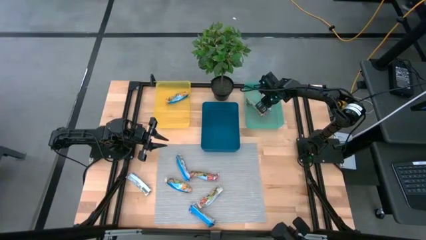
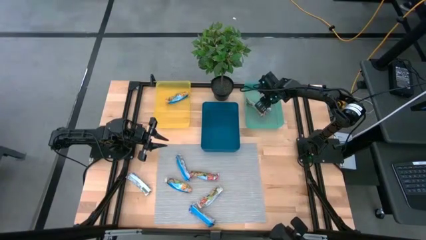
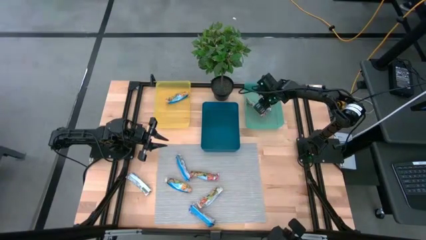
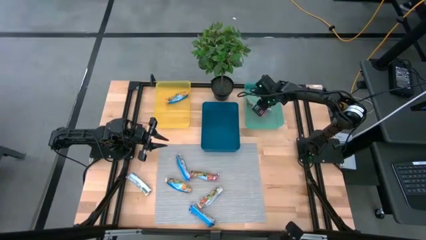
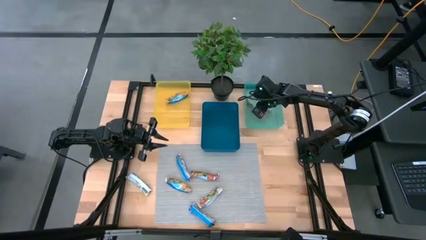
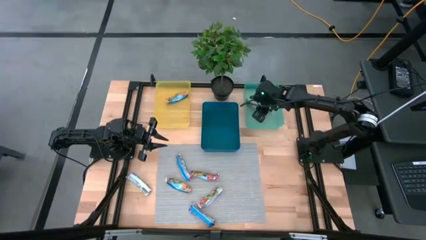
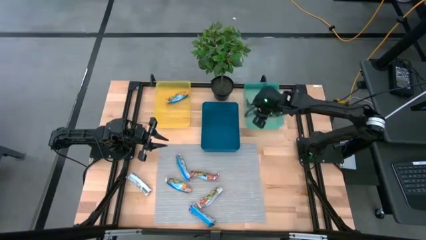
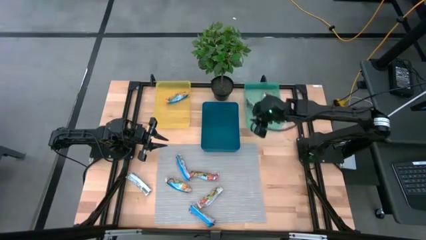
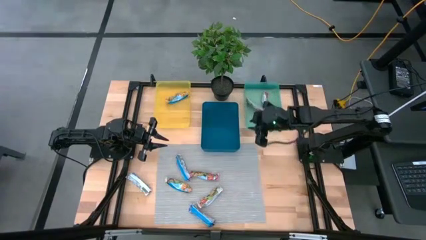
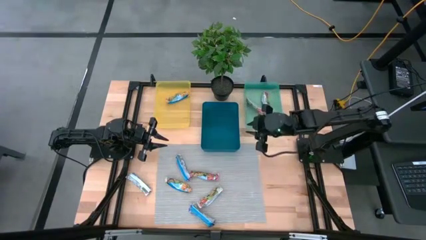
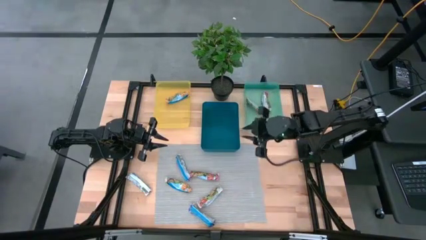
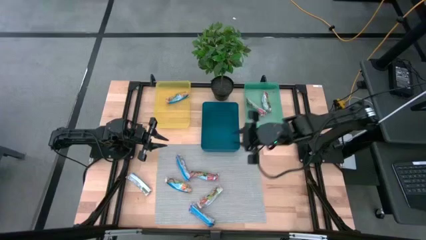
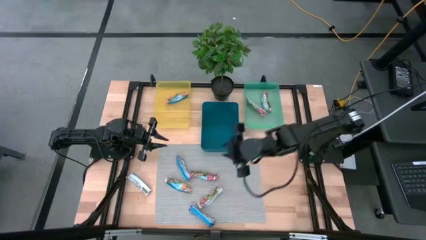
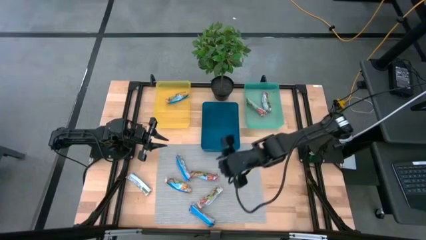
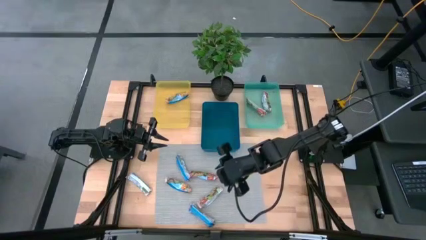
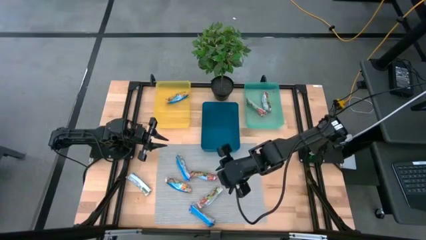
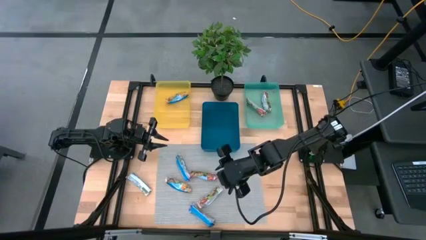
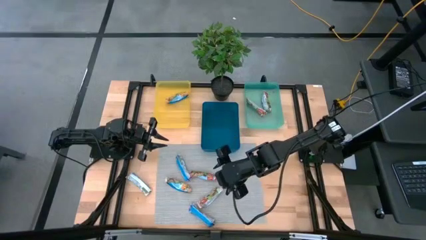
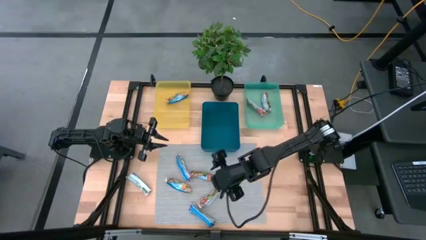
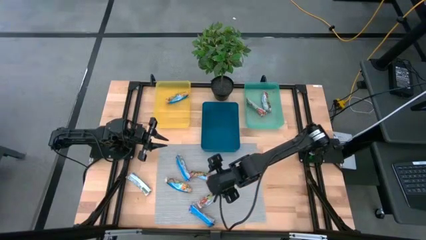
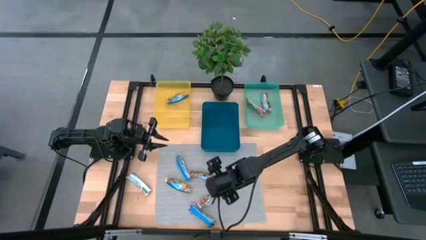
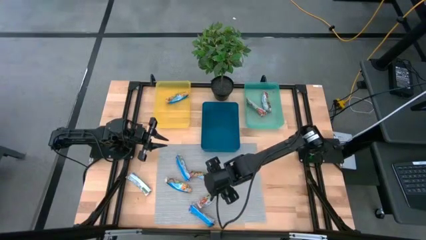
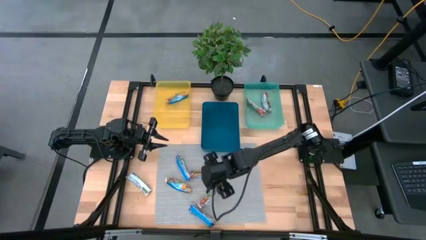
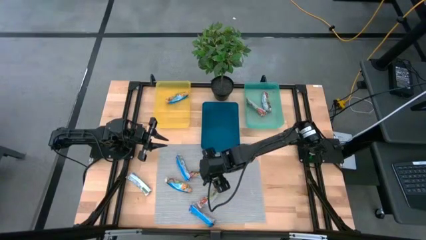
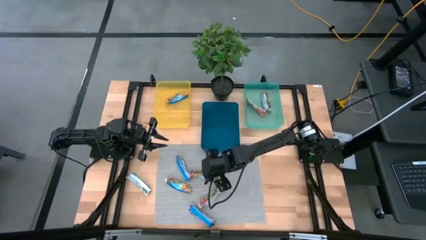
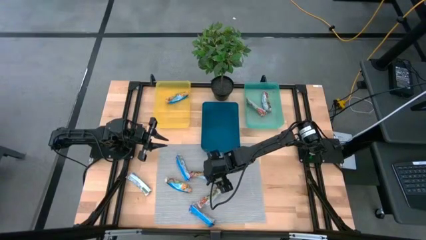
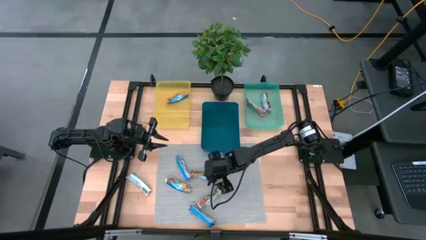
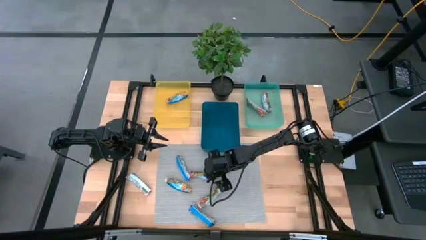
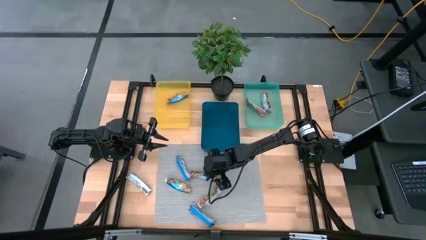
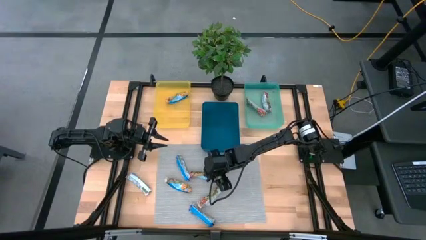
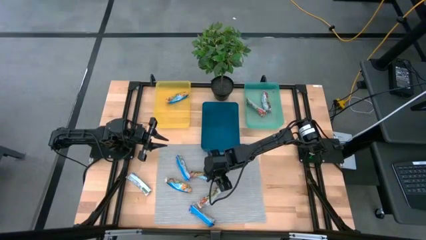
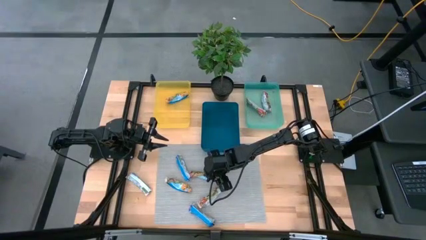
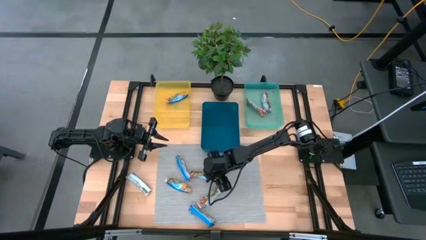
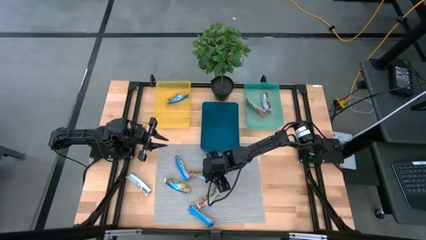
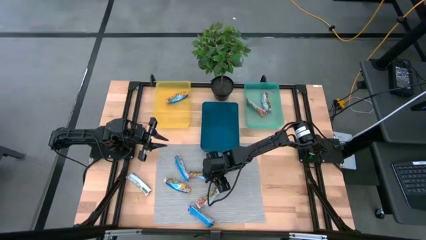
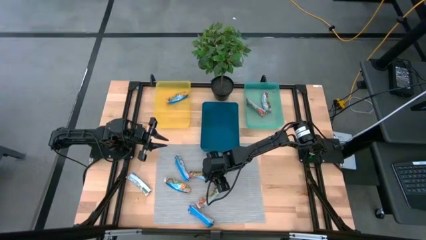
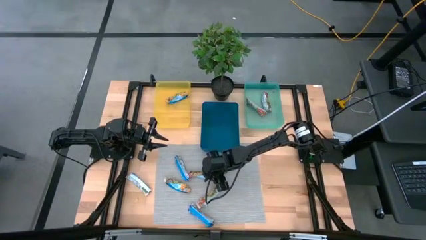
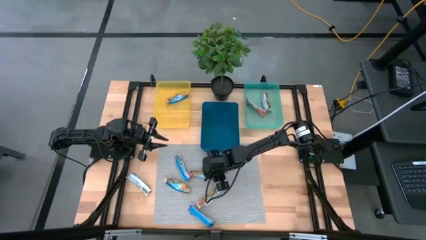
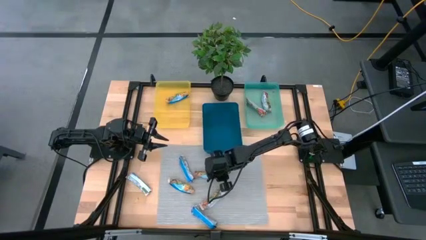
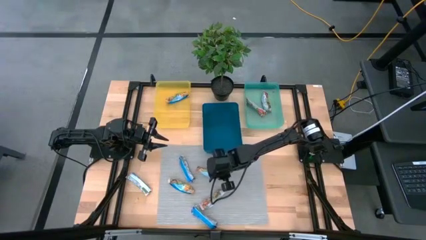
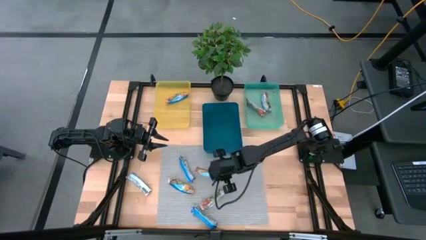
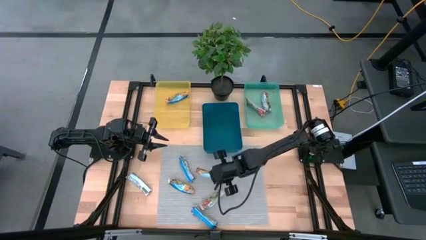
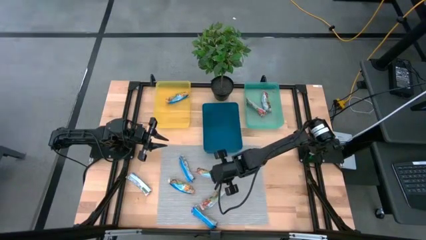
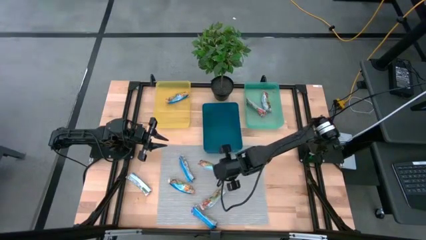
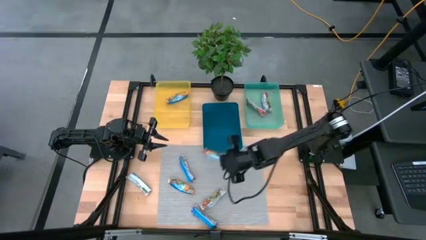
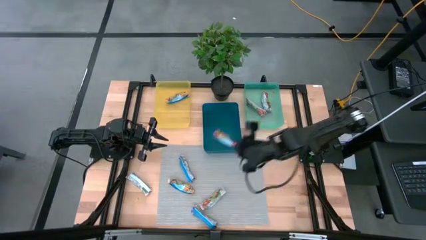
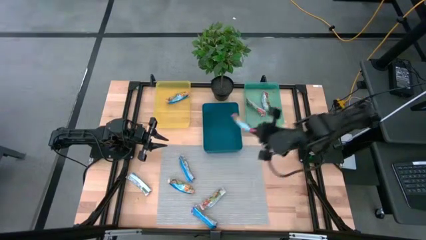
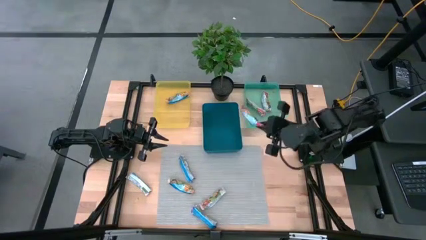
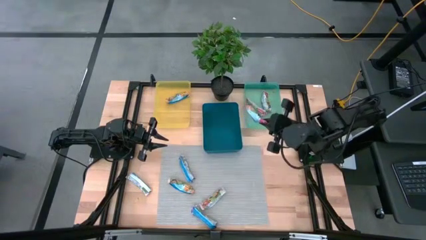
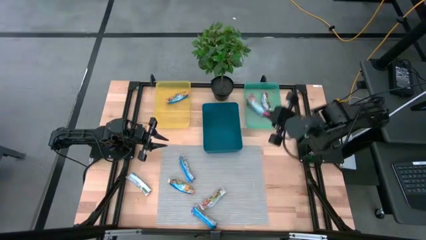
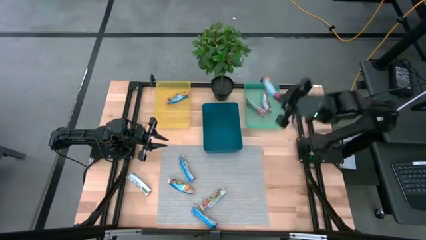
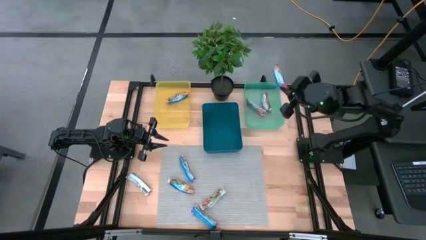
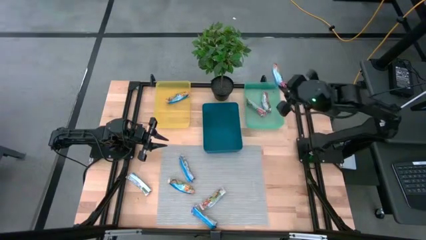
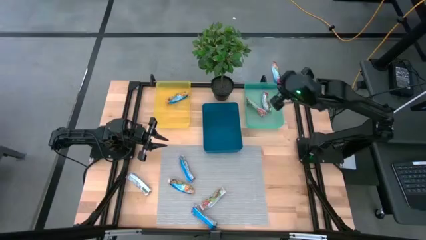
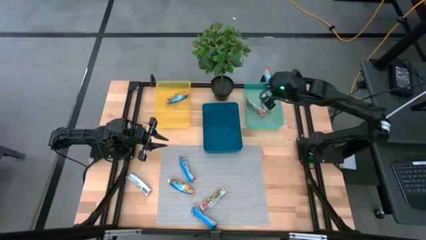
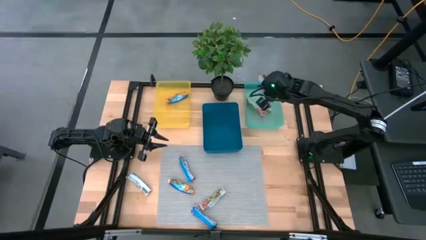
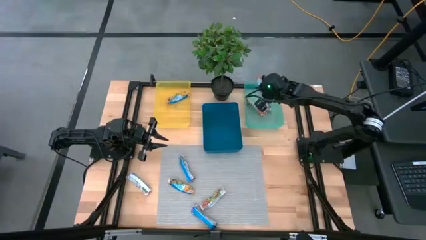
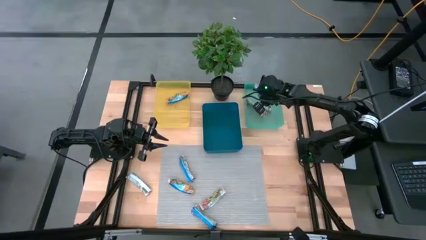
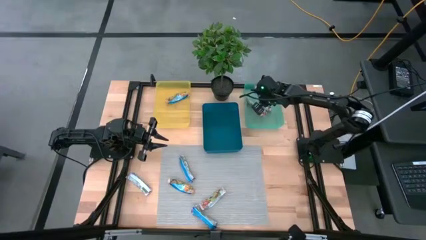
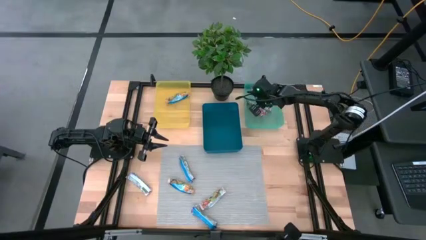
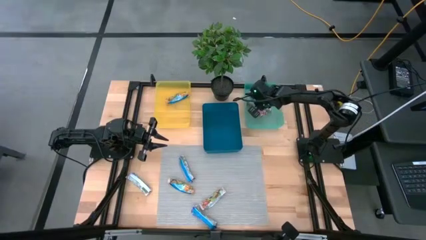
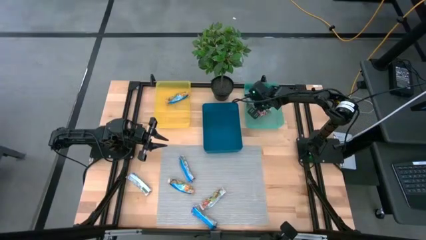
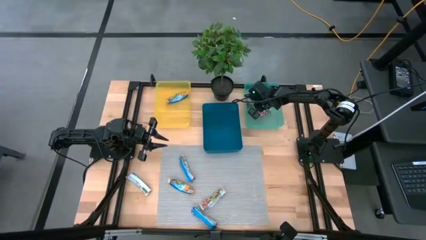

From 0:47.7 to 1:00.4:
Task: Pick and place Granola Bars by type
Put the red granola bar into the green bin

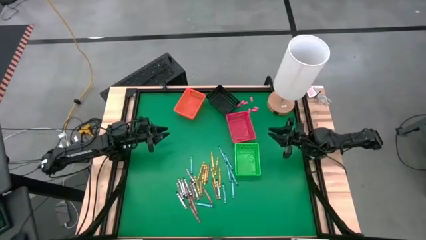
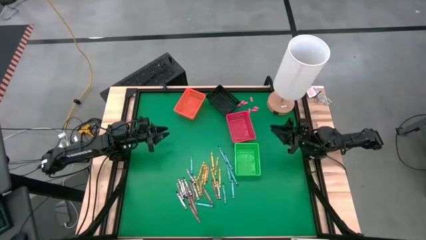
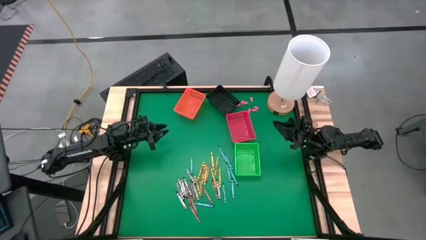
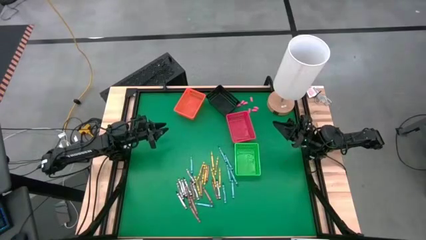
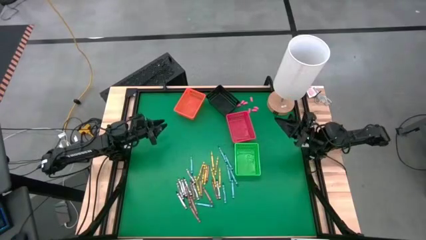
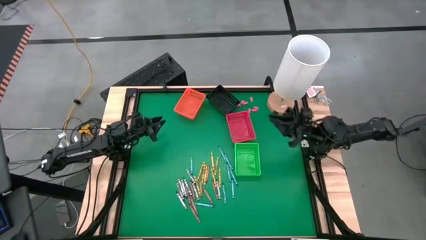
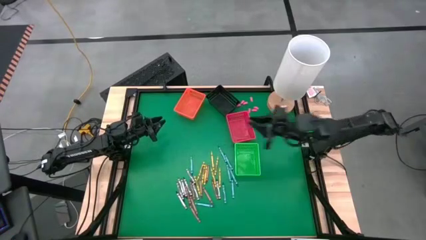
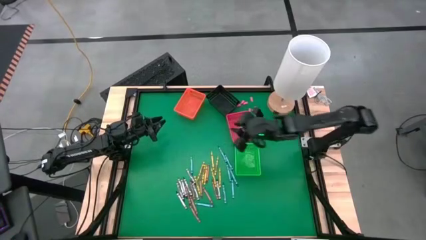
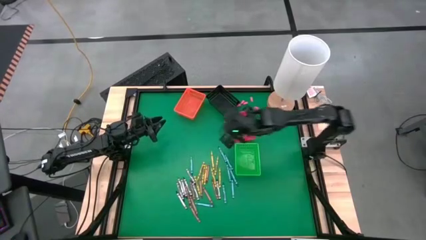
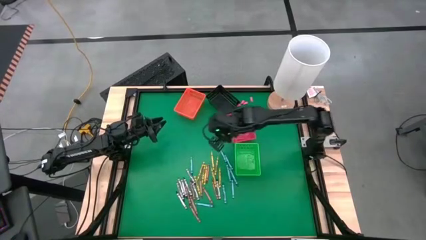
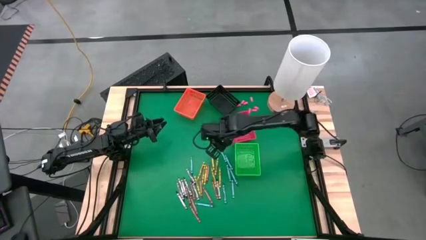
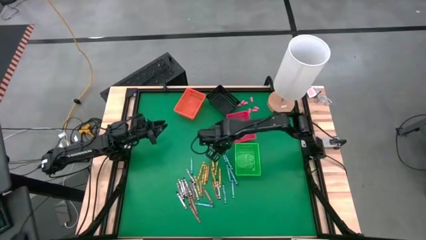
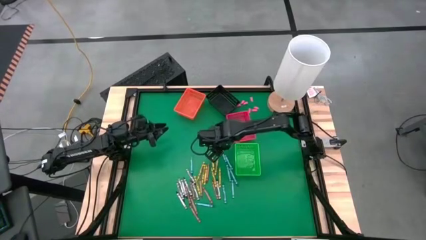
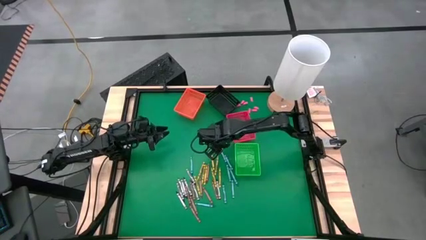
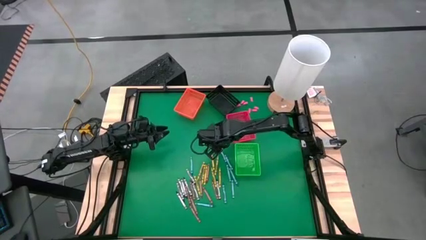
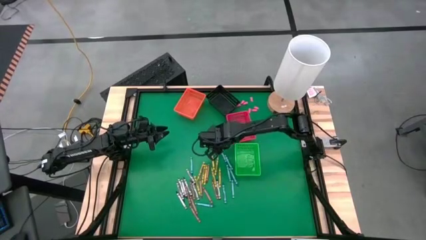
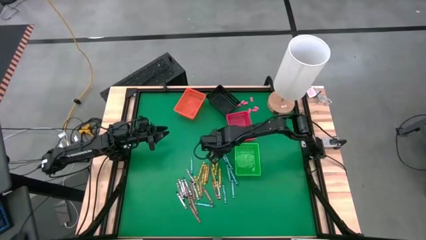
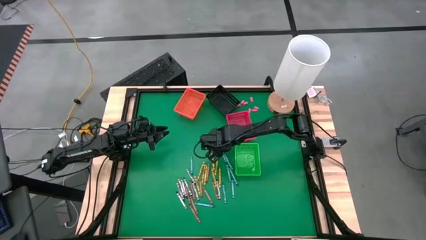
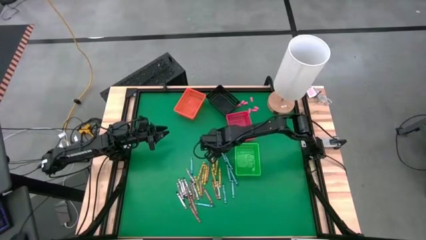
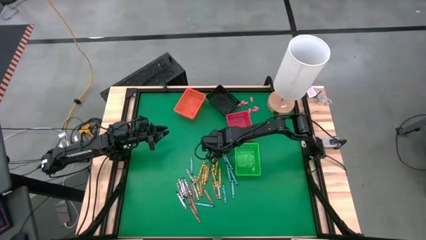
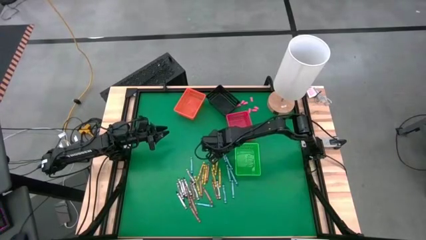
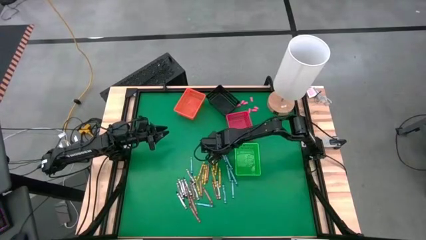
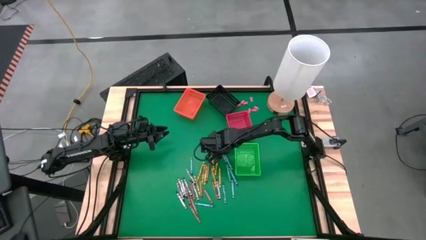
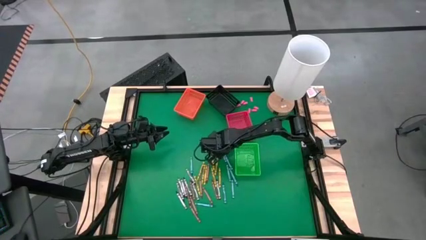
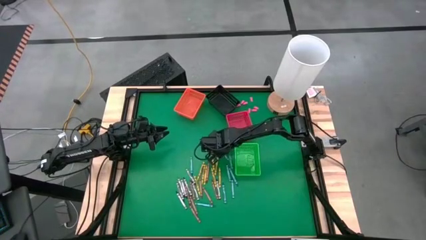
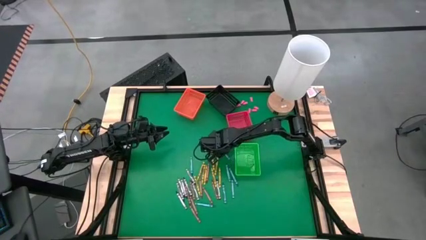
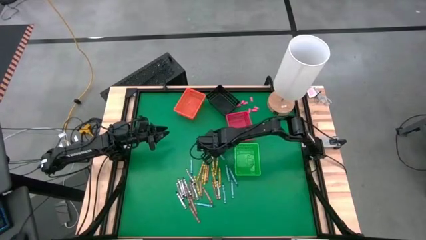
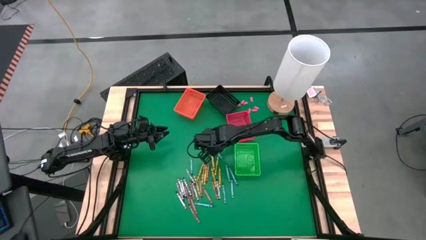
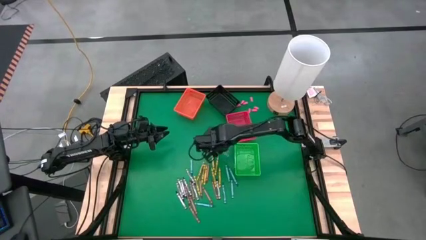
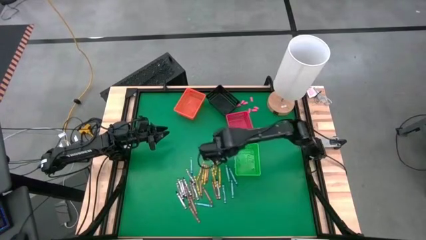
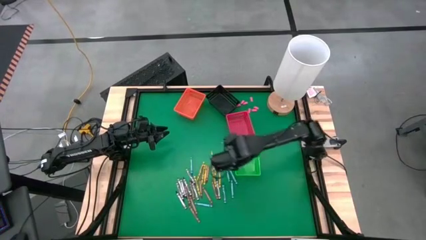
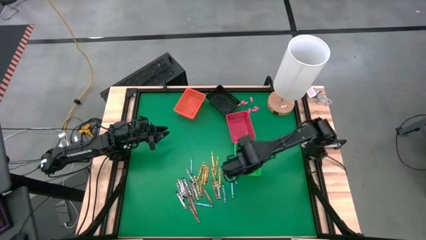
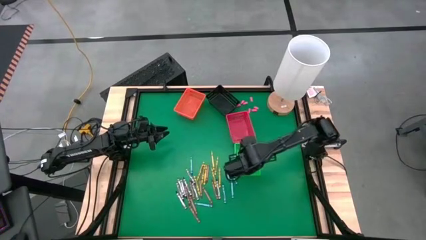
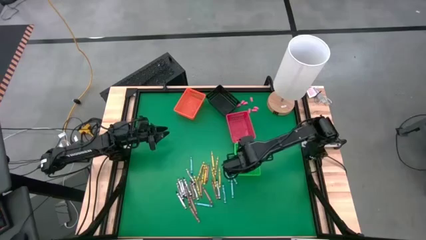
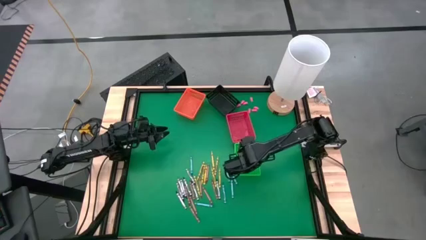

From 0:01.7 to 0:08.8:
Task: Sort crayons
Put the light blue crayon into the green bin
